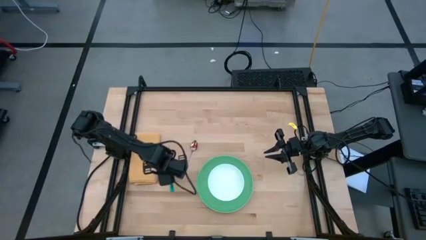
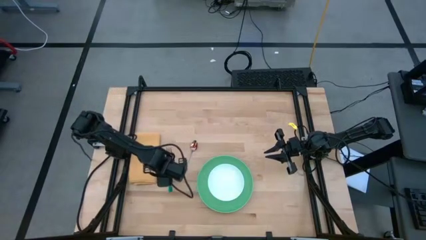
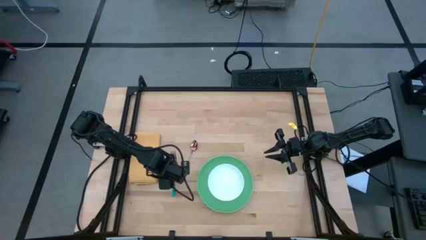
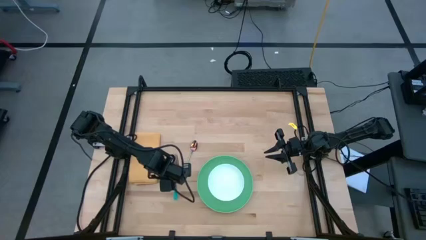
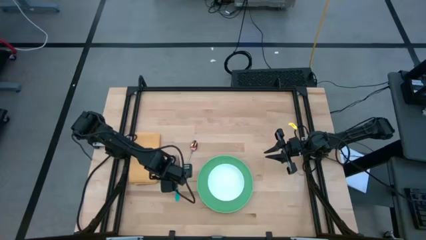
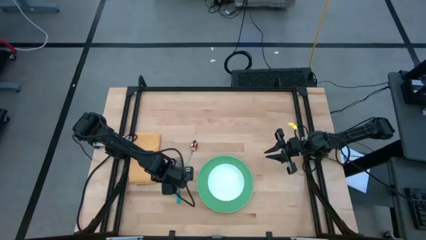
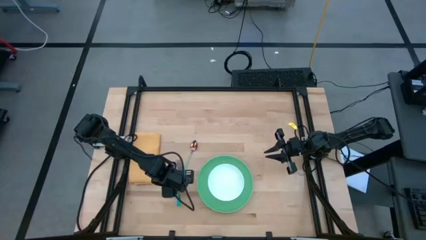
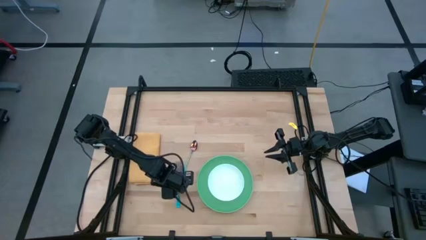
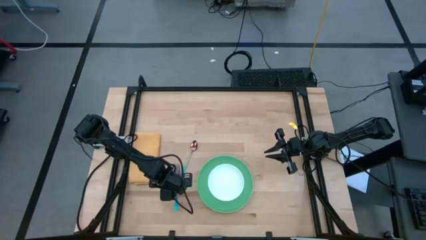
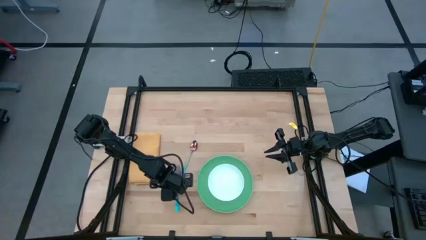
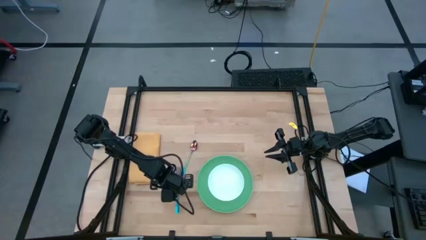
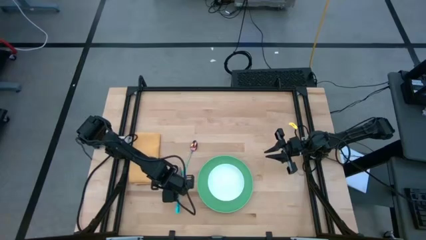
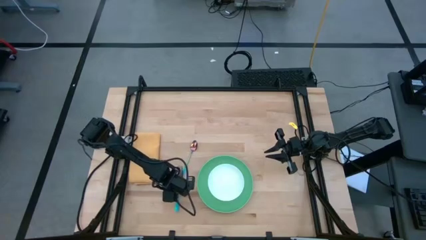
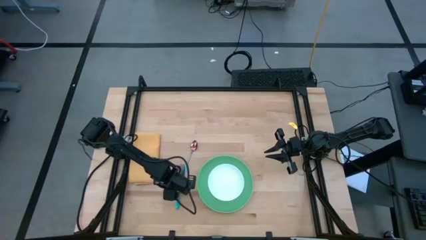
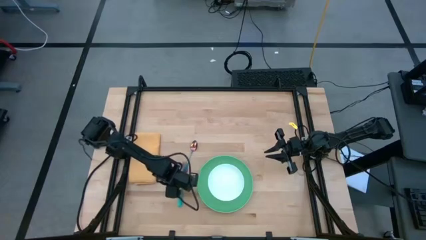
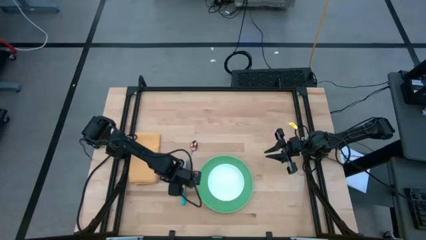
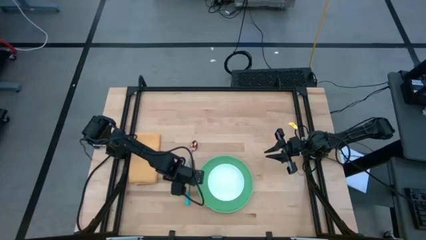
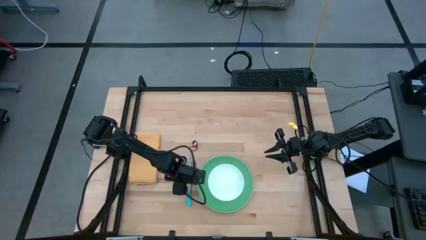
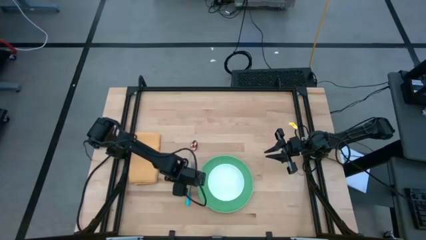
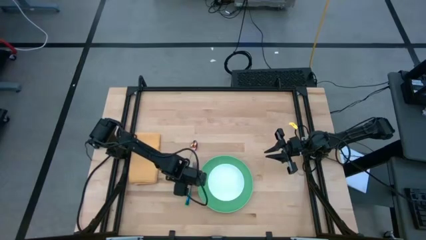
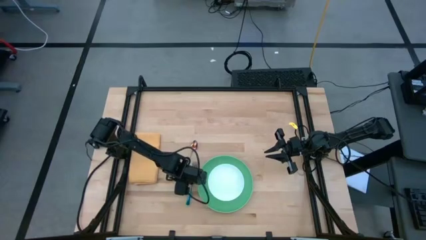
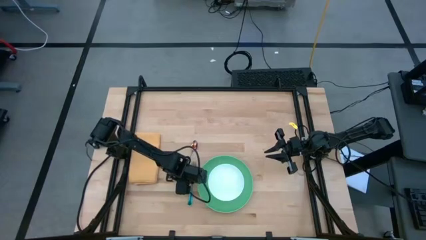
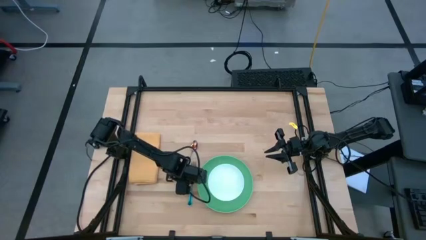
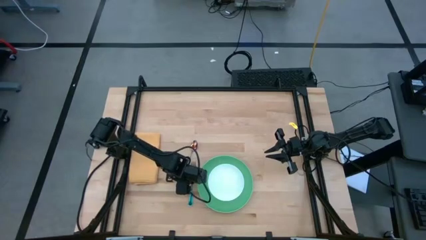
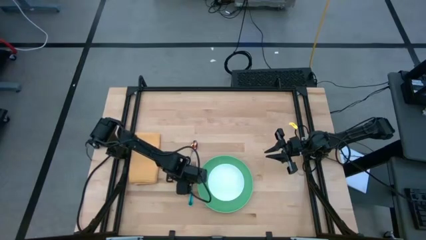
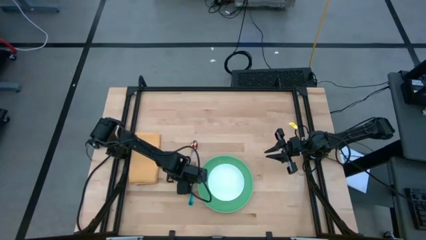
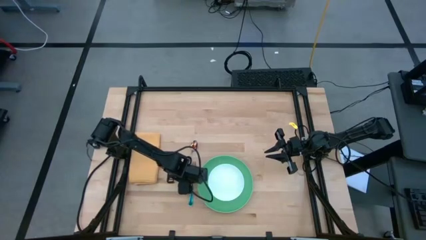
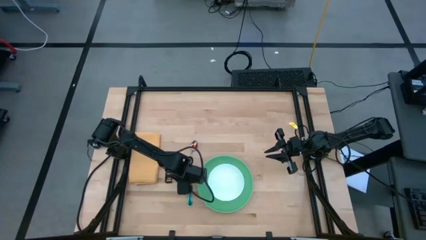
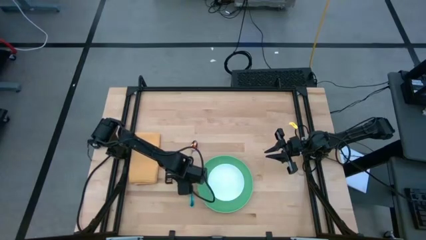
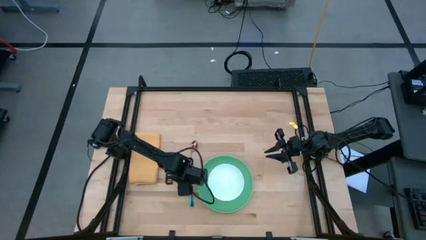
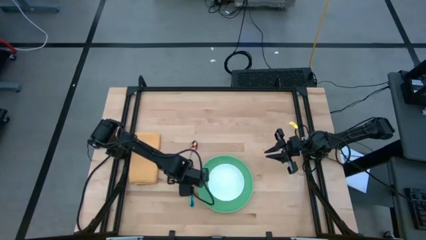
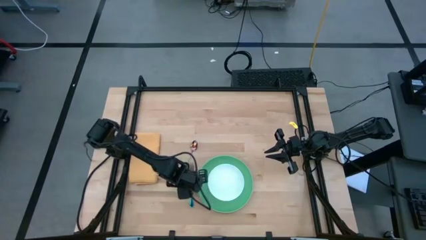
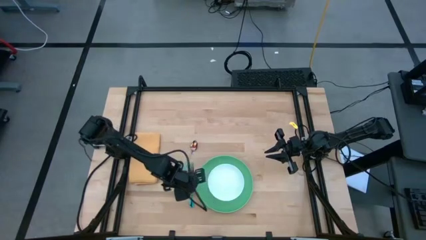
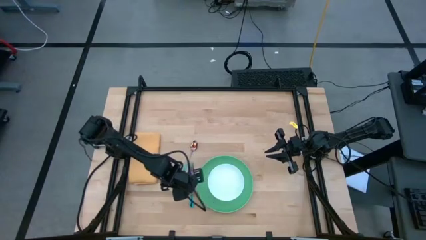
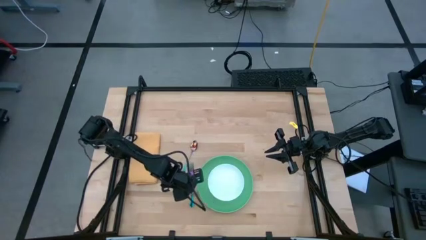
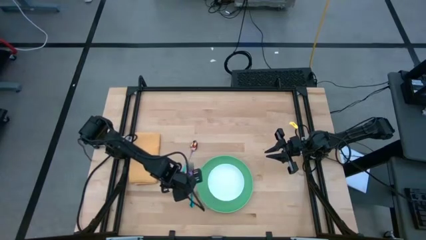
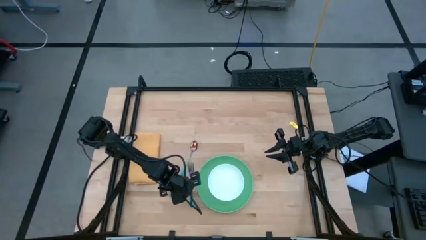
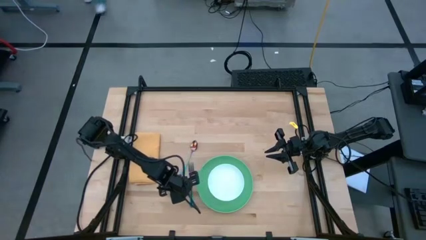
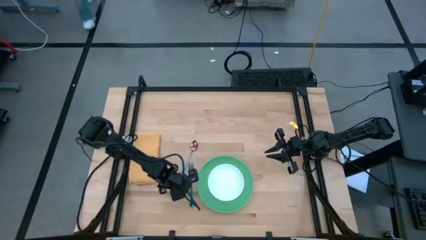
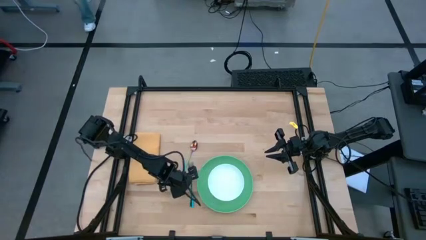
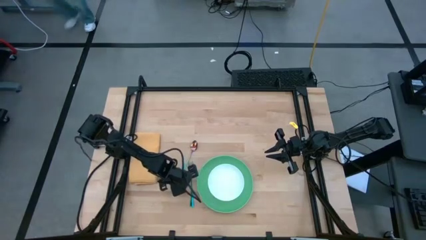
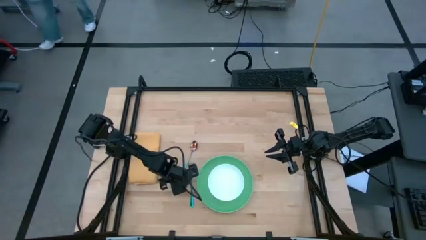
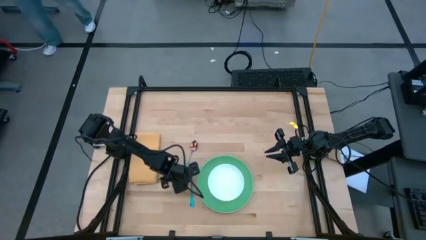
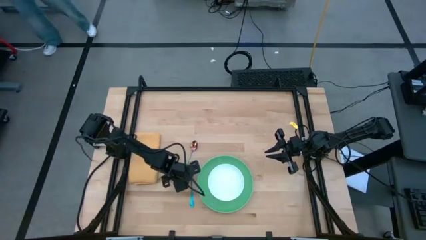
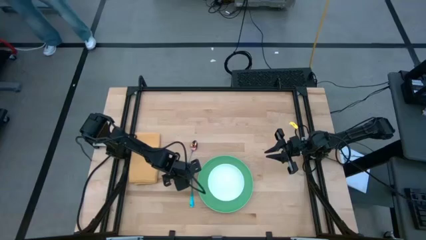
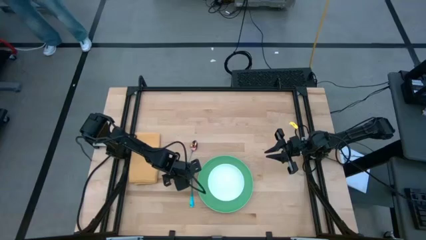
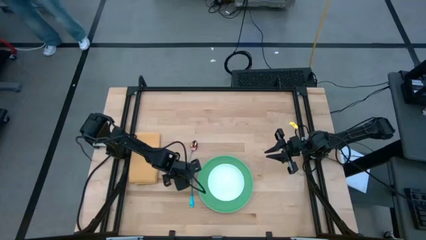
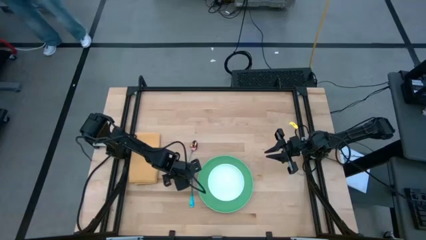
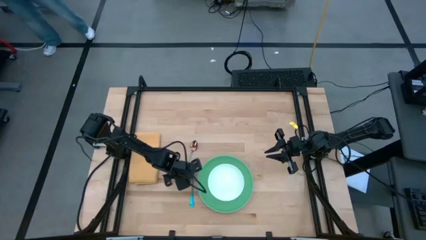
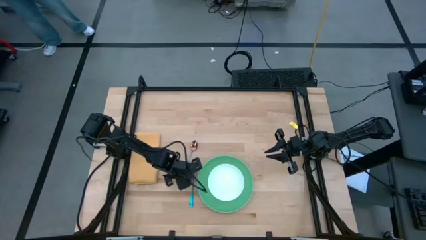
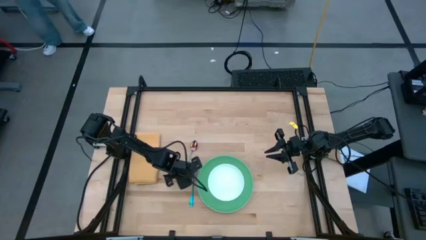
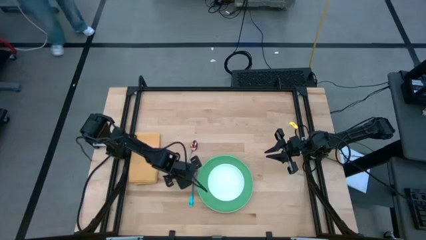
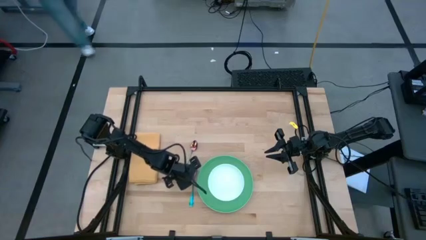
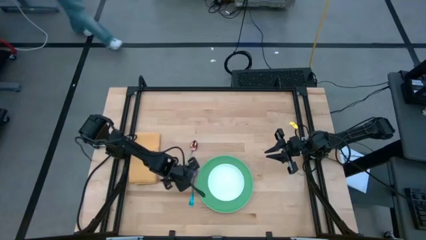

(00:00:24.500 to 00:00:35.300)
Task: Set table place
Put the violet fork to the left of the green plate
